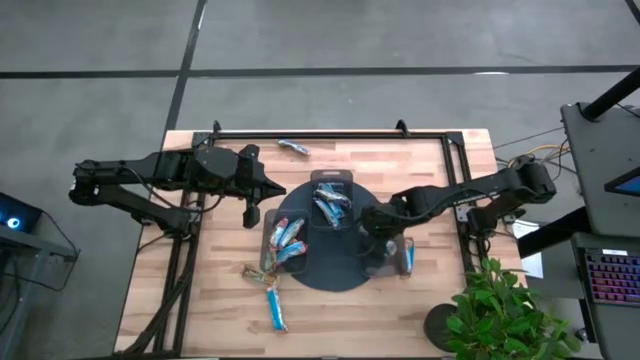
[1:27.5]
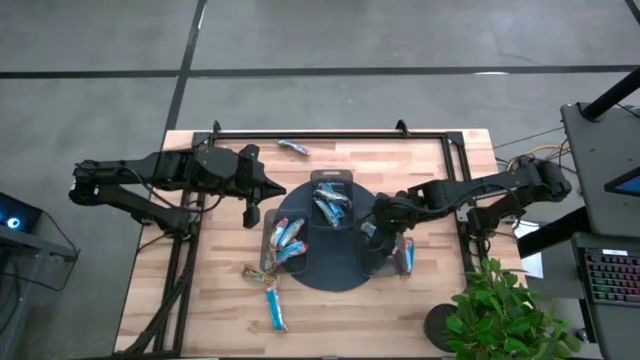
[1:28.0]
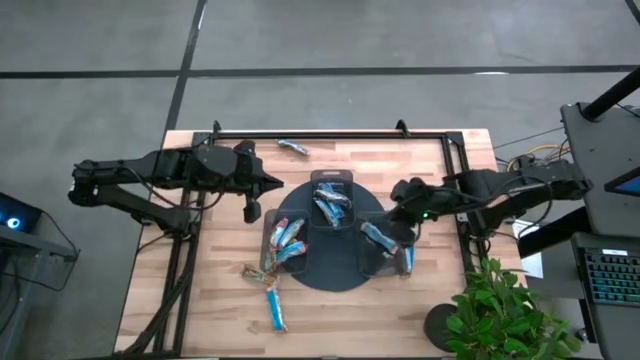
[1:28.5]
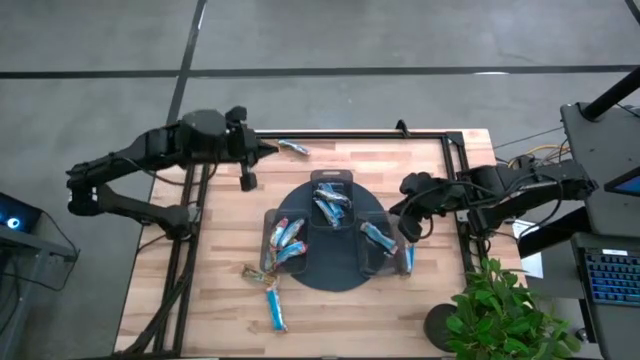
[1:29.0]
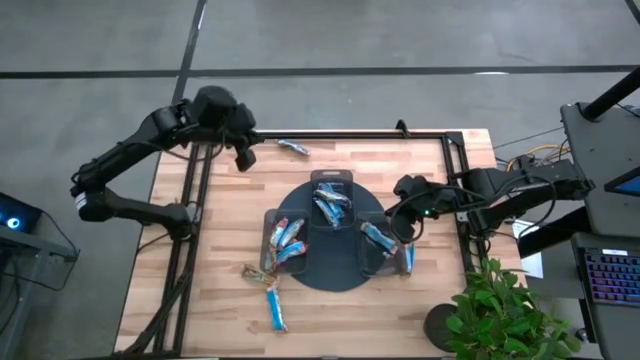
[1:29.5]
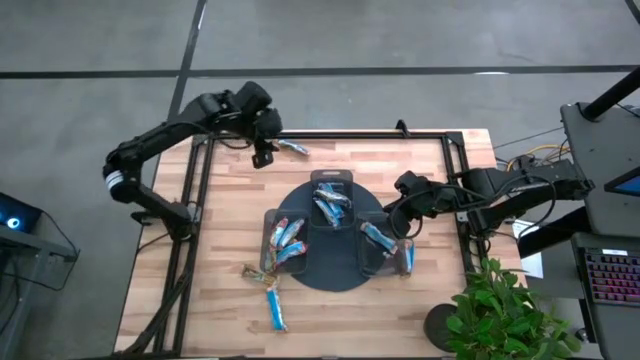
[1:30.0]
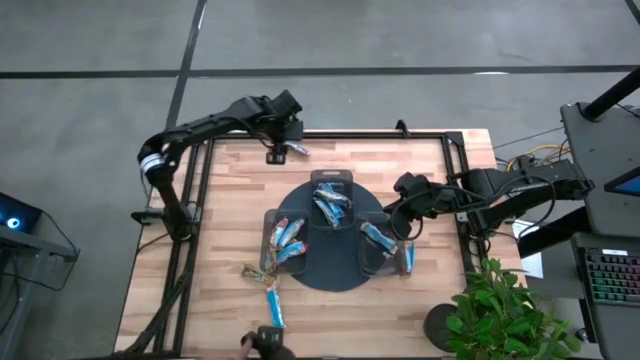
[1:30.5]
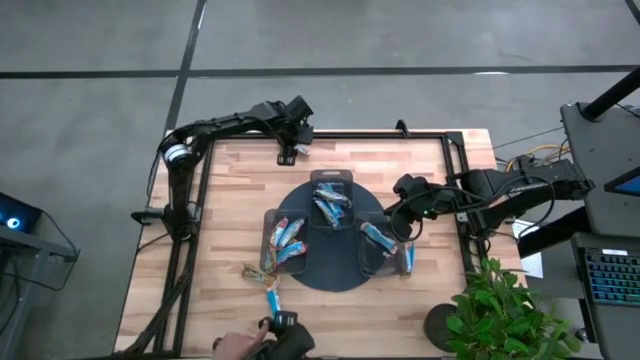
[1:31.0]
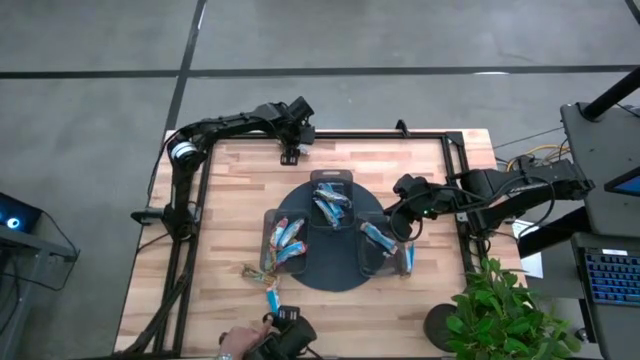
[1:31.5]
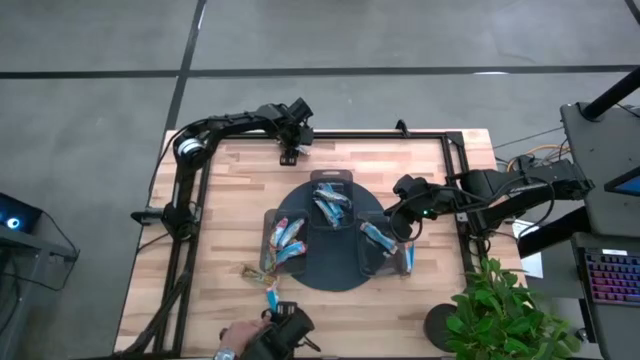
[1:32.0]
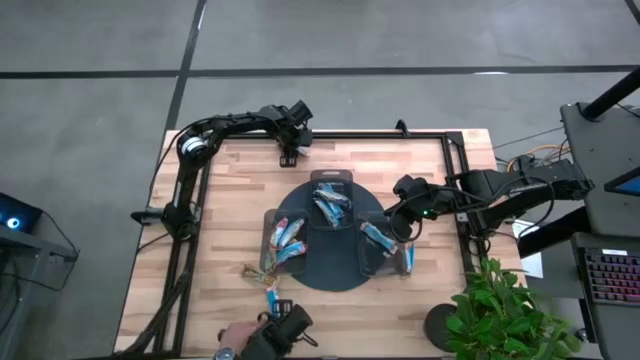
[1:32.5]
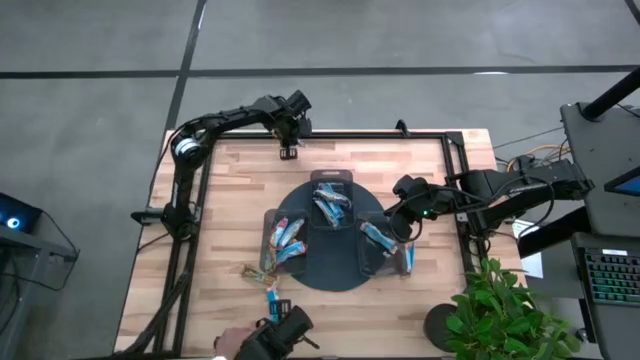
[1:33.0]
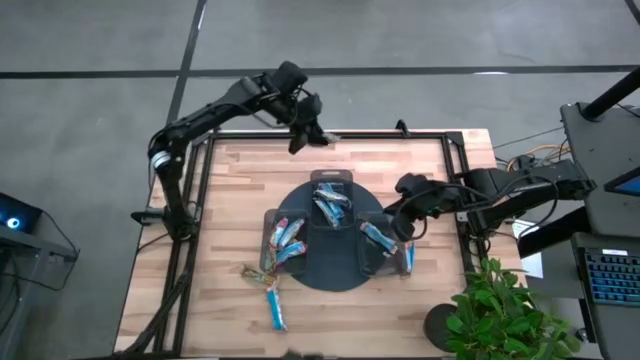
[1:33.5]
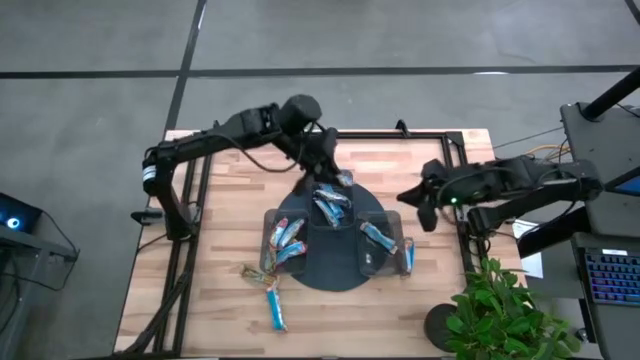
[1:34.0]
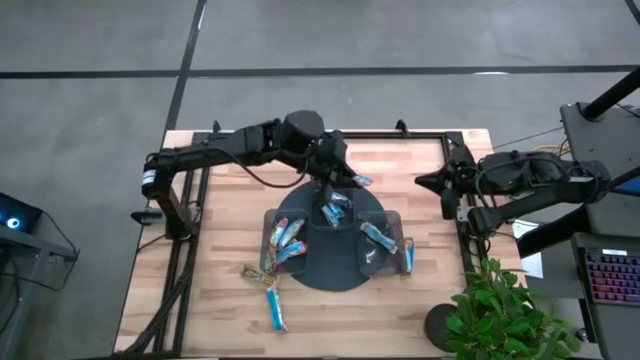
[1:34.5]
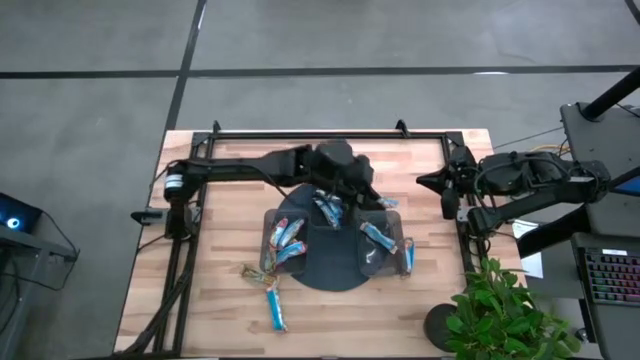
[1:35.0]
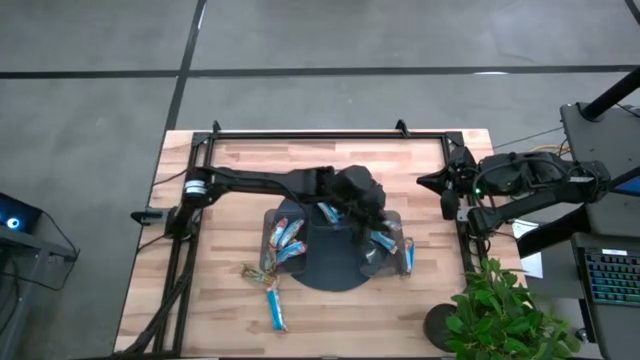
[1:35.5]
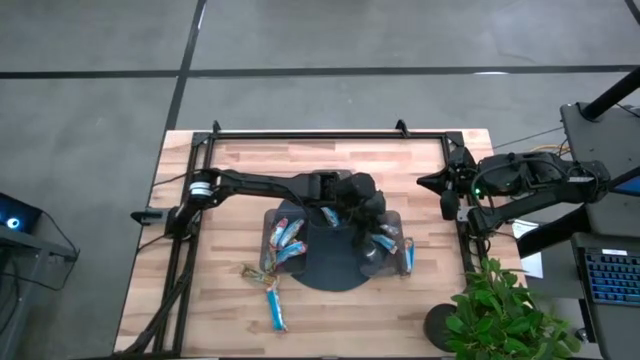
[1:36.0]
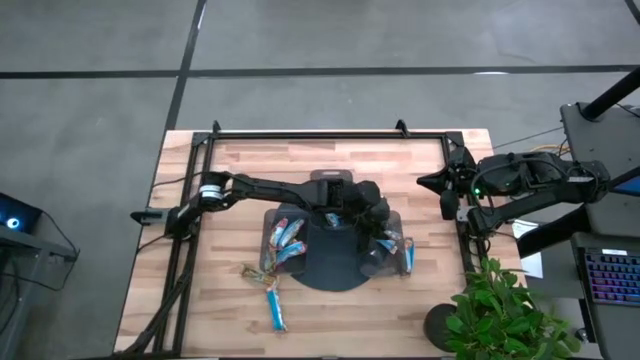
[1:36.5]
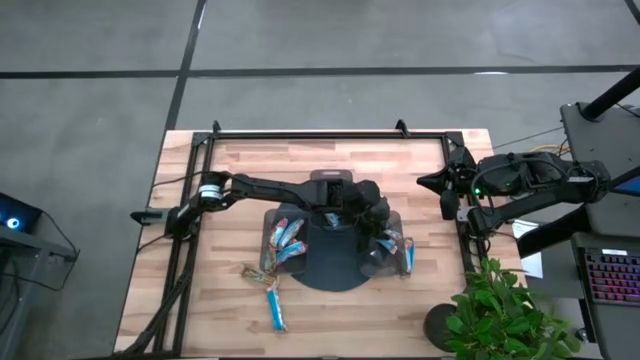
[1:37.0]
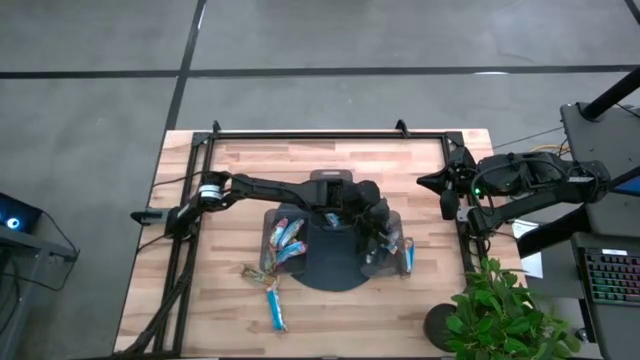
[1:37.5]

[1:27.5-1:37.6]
Task: Pick and place Granola Bars by type
Put the yellow granola bar into the bottom right black bin

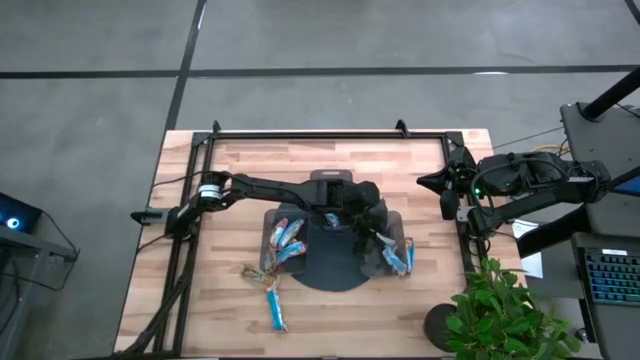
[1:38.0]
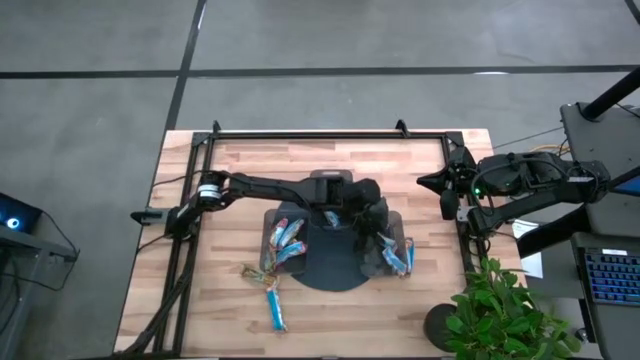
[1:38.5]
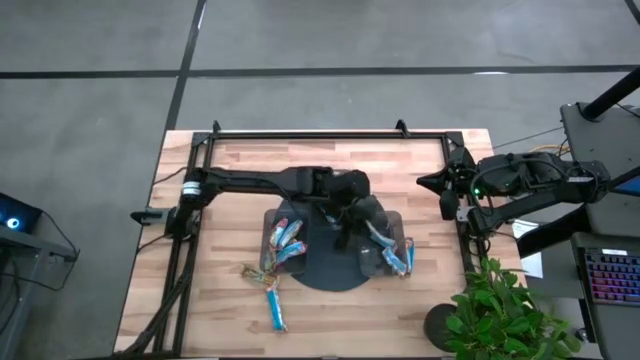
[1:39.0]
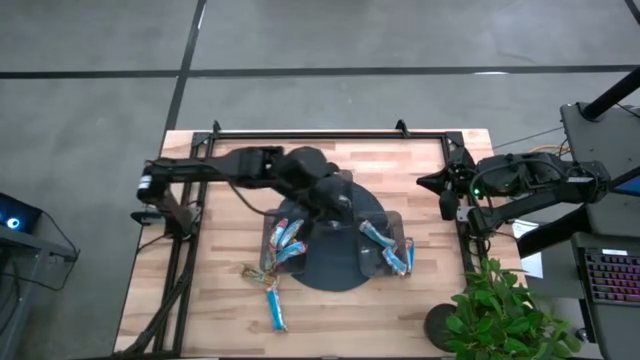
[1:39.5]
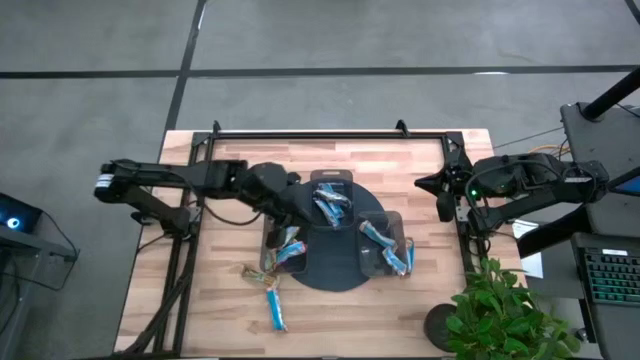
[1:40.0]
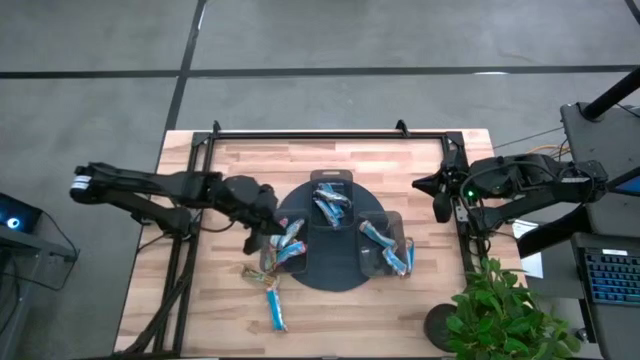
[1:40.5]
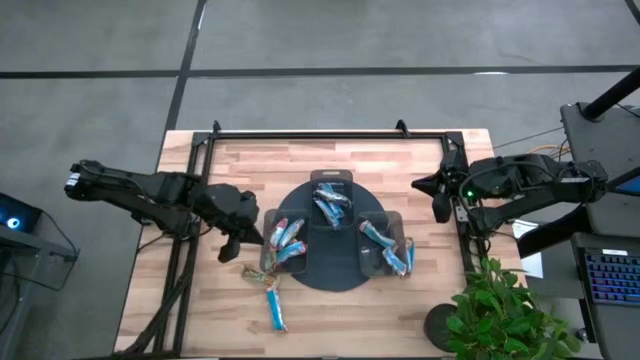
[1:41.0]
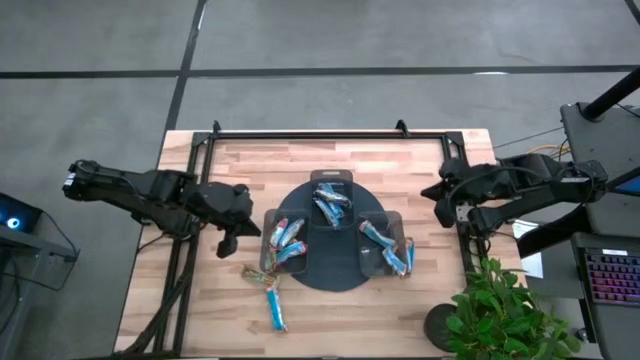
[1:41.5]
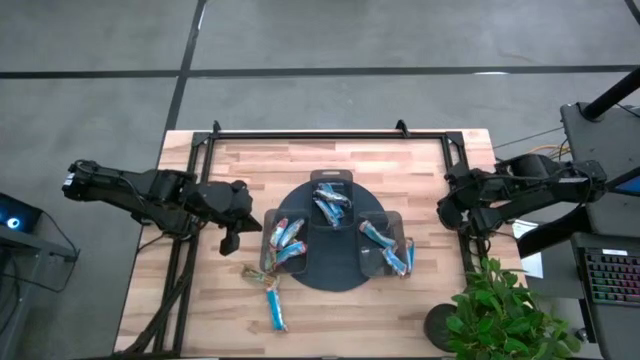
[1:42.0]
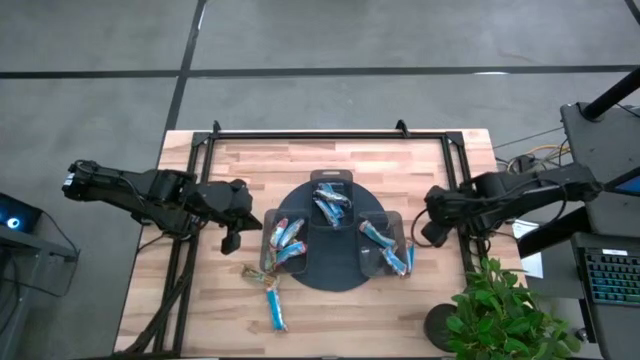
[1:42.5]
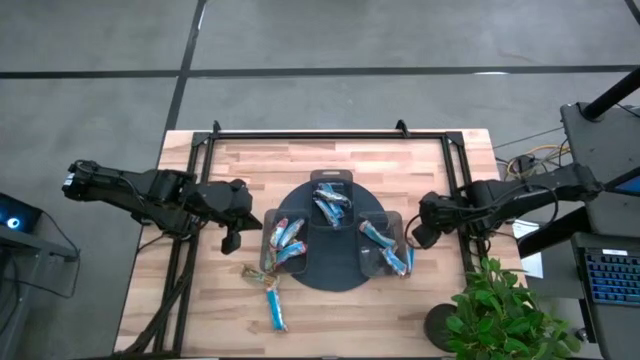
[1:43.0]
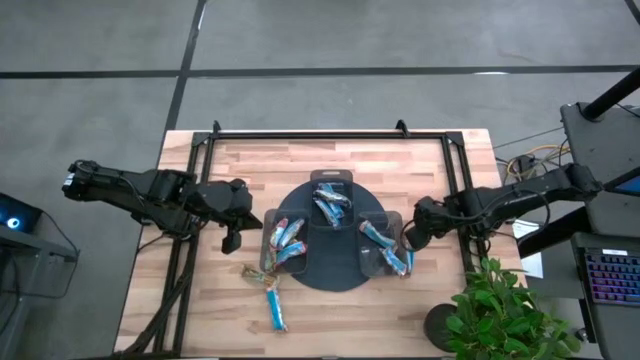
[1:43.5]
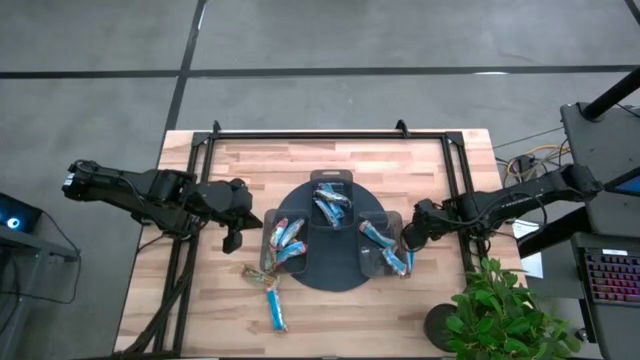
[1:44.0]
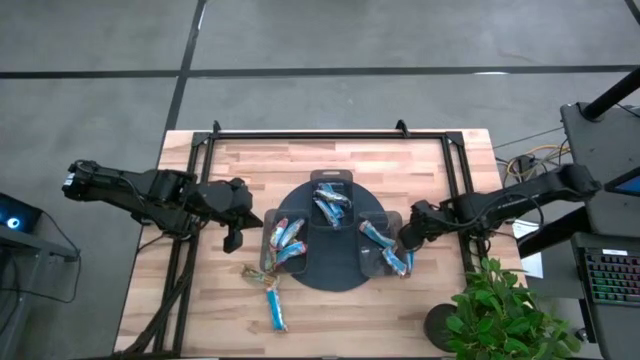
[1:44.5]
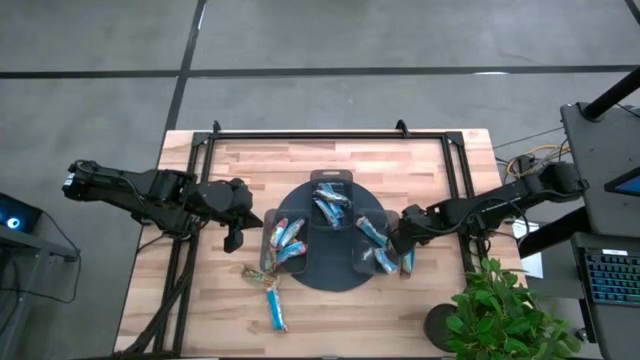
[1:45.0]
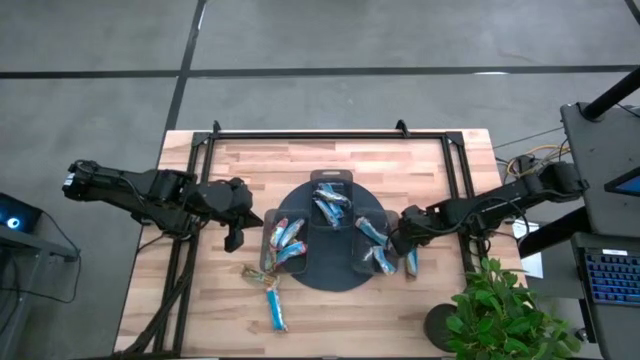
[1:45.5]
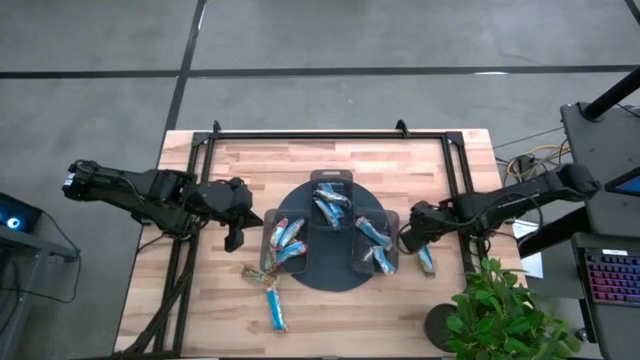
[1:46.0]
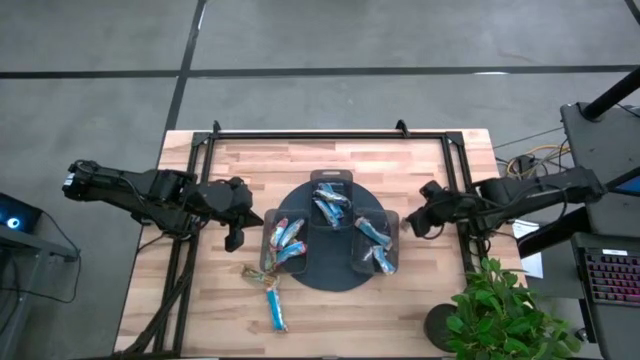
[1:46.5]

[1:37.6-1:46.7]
Put the yellow granola bar into the bottom right black bin

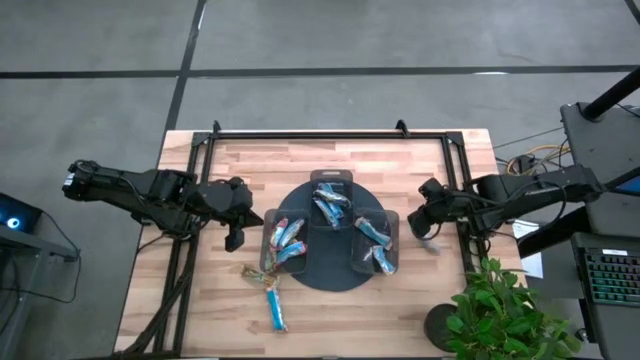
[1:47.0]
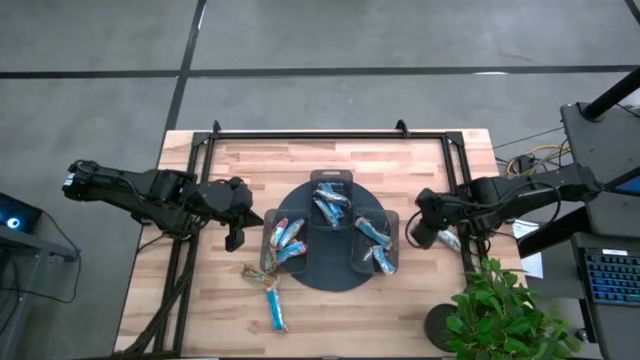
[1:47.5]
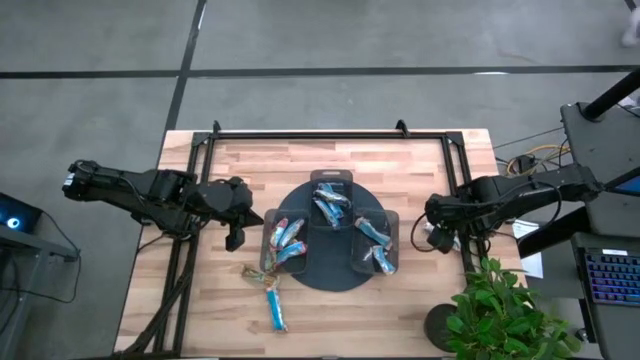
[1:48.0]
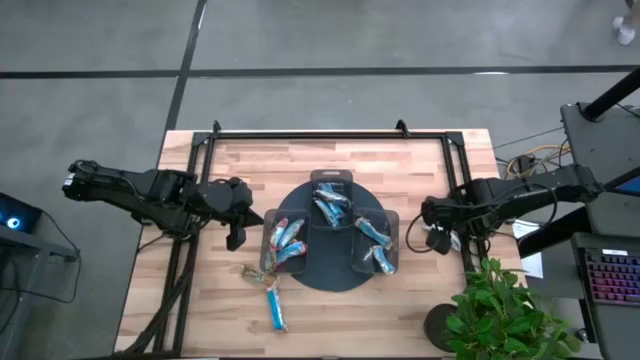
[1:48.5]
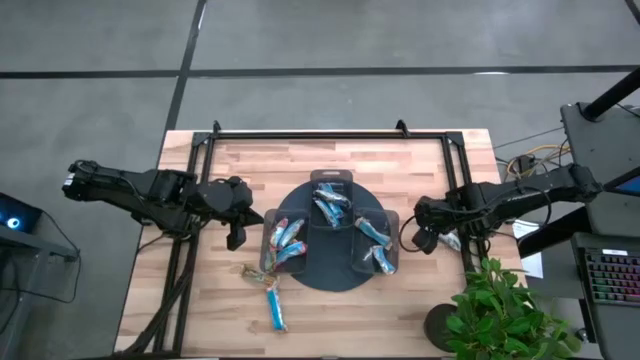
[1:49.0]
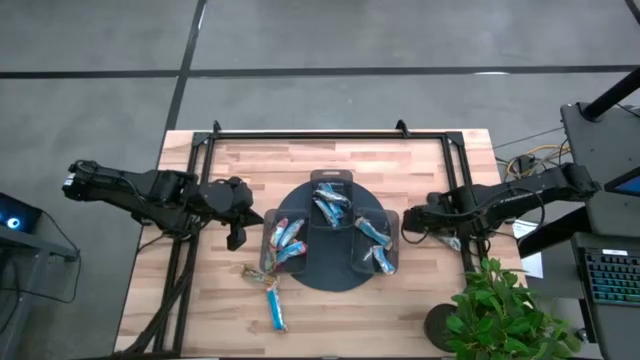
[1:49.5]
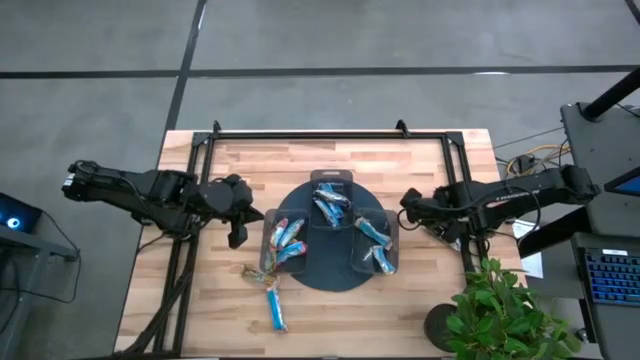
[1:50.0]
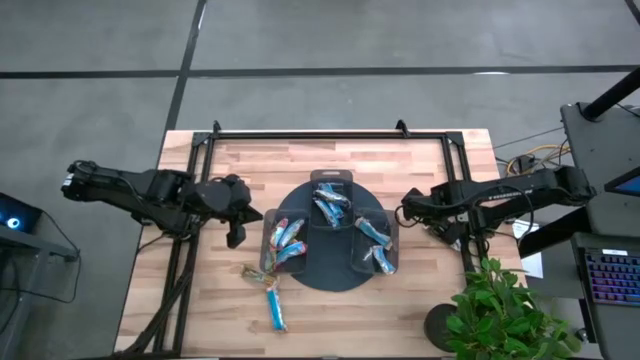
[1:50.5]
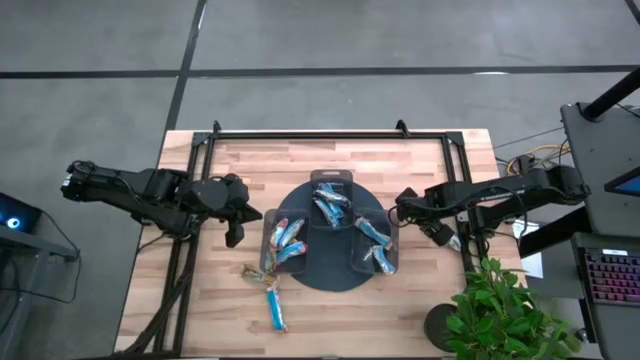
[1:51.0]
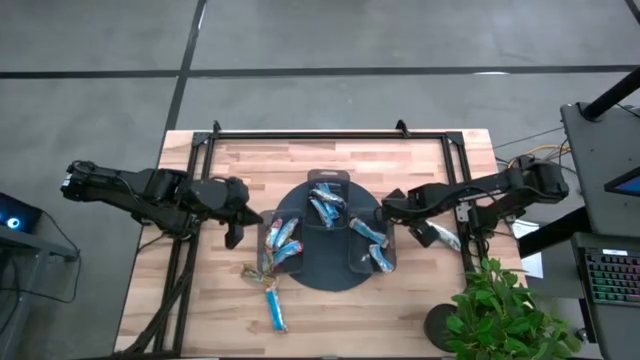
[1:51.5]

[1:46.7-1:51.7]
Adjust the bottom right black bin
